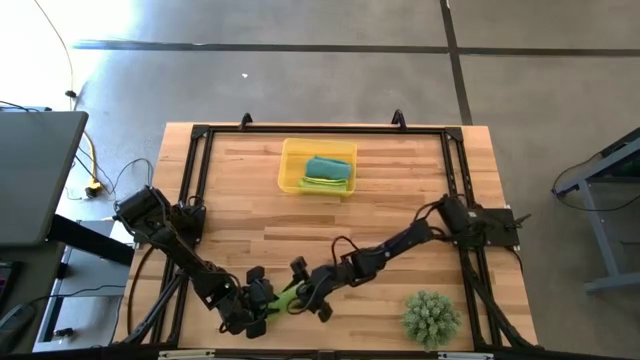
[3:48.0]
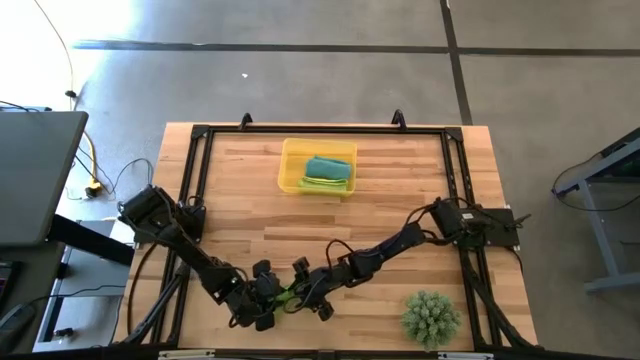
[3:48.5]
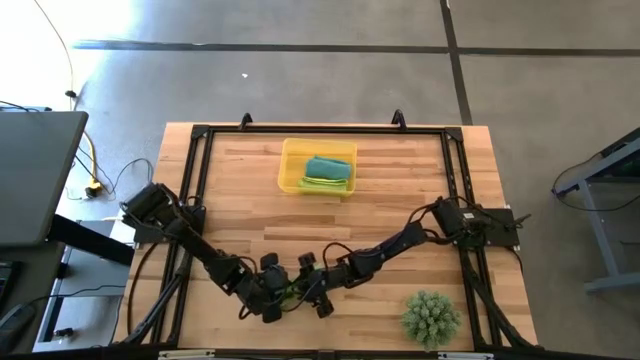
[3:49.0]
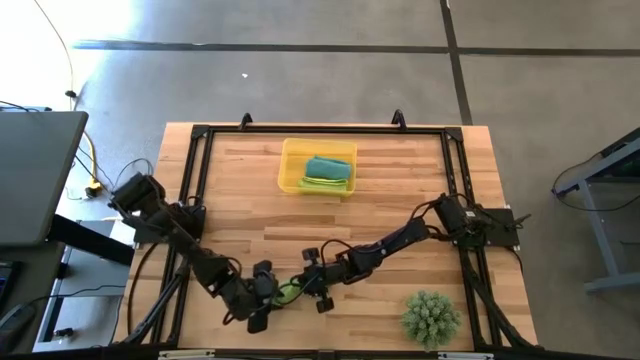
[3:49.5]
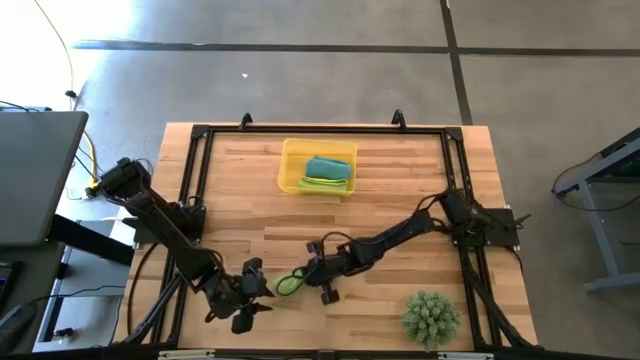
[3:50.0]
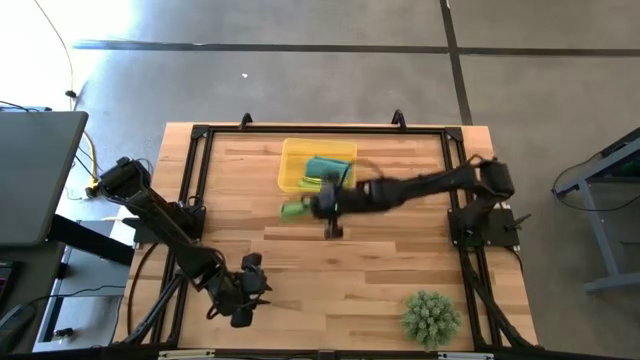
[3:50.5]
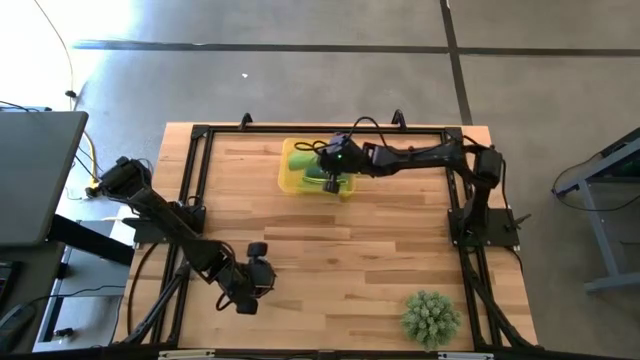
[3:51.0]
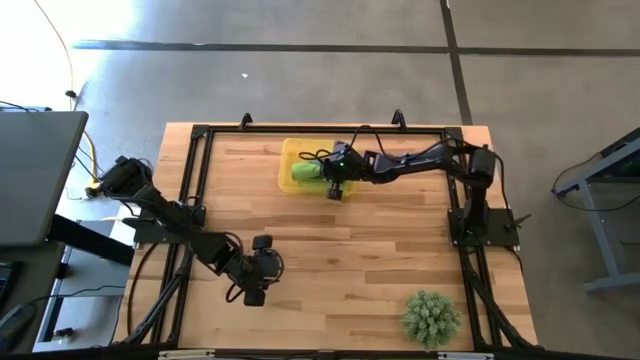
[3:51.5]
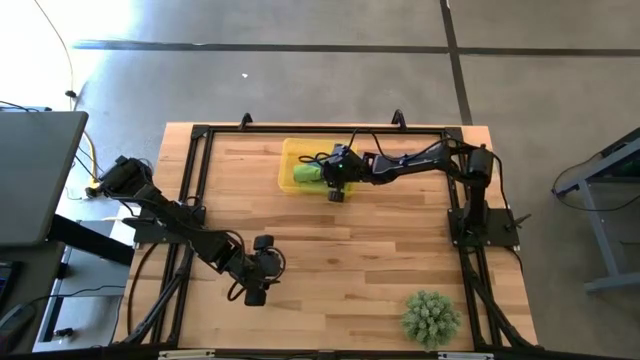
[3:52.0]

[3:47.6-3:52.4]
Task: Roll microfiber towels into tight, uniform cylinder then place into a basket
Put the rolled green microfiber towel into the bin

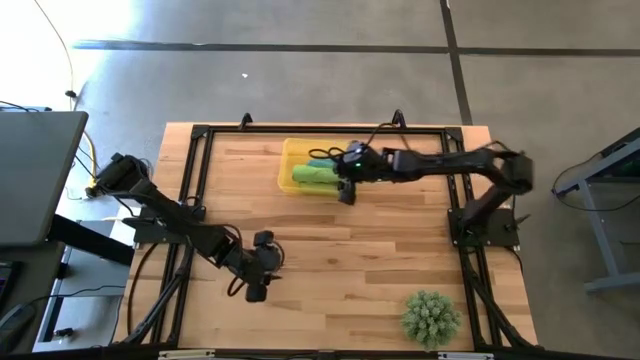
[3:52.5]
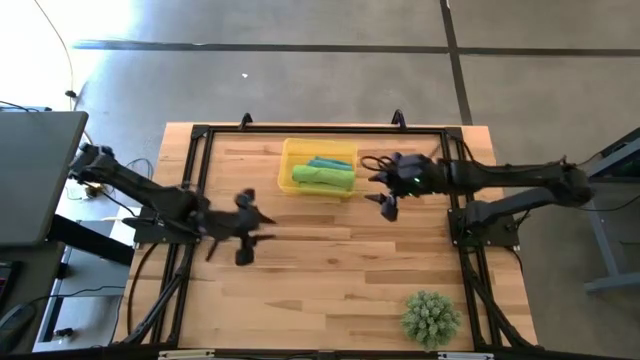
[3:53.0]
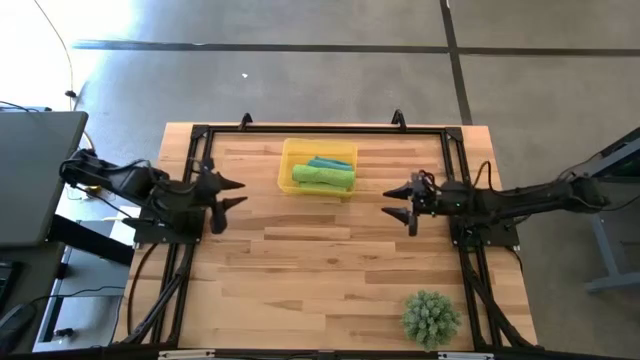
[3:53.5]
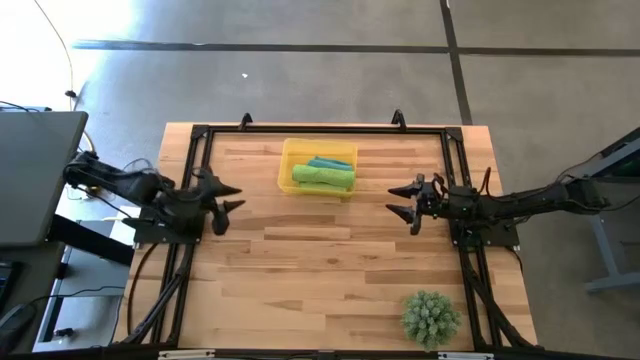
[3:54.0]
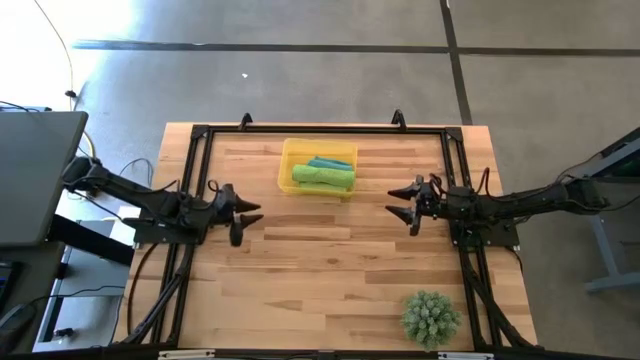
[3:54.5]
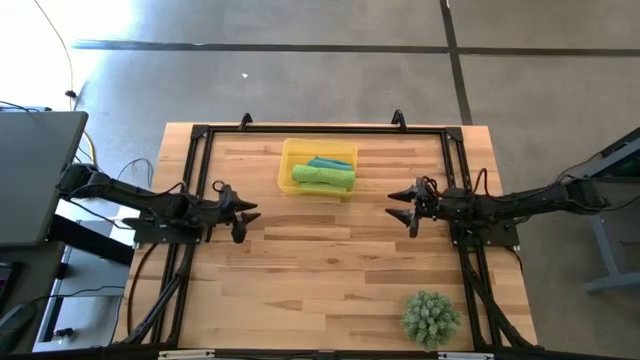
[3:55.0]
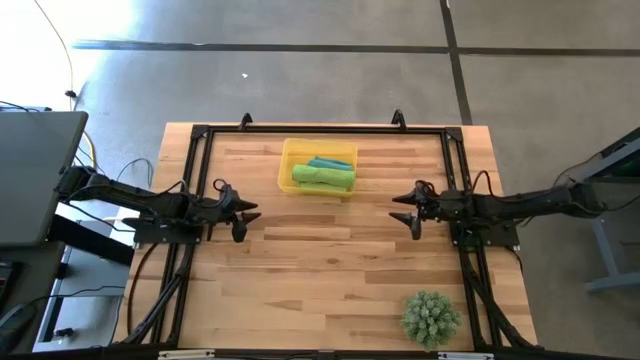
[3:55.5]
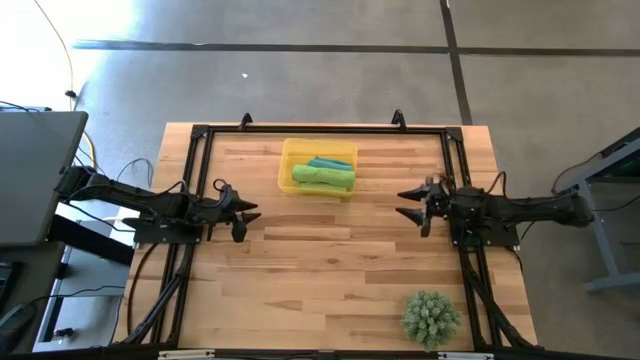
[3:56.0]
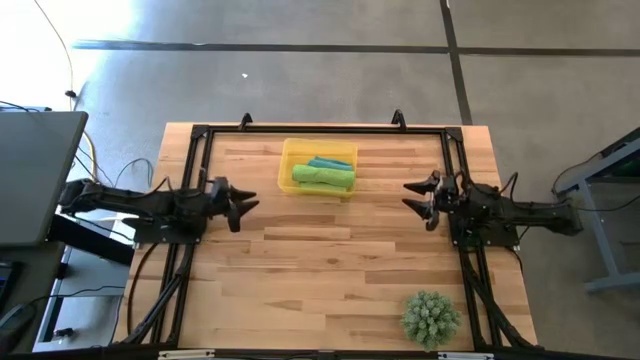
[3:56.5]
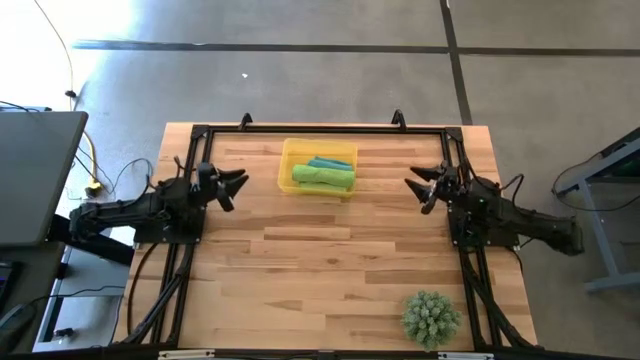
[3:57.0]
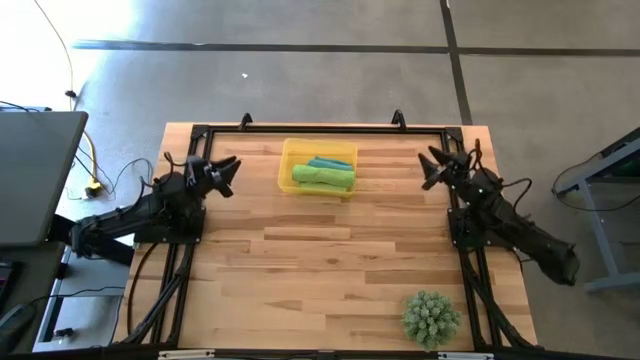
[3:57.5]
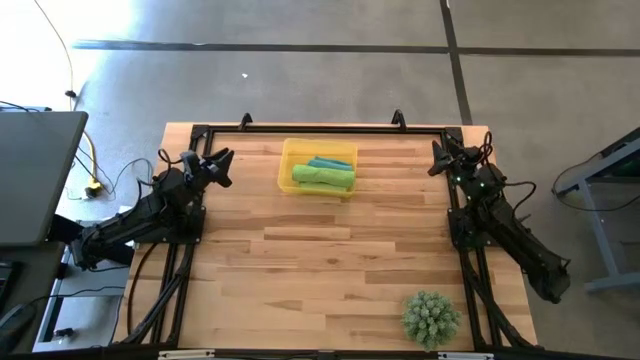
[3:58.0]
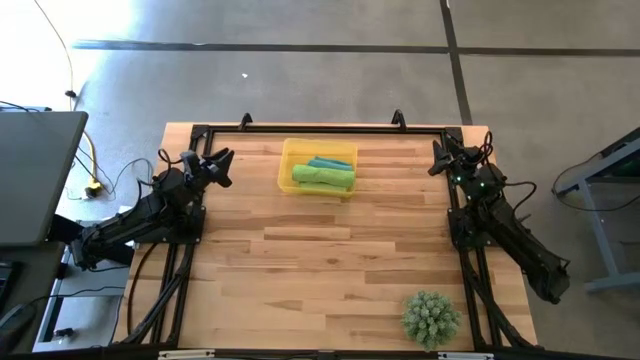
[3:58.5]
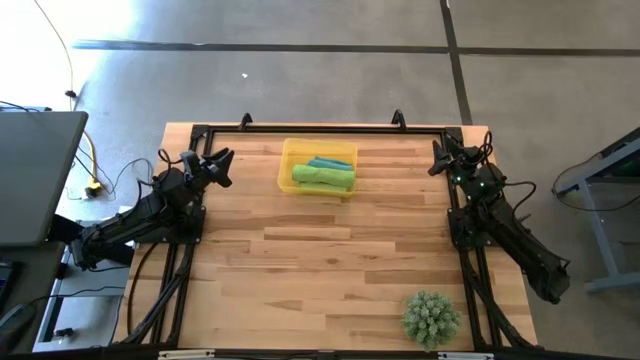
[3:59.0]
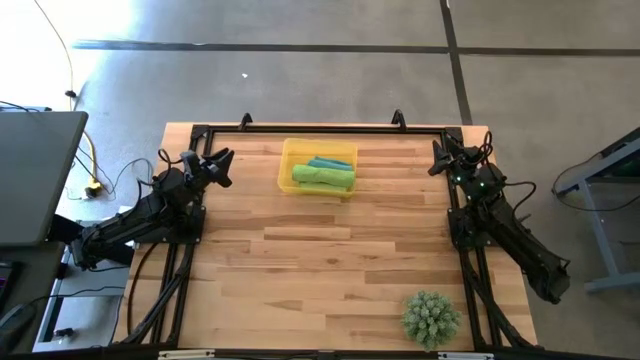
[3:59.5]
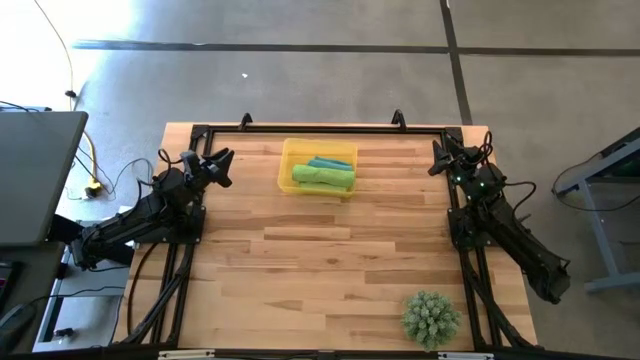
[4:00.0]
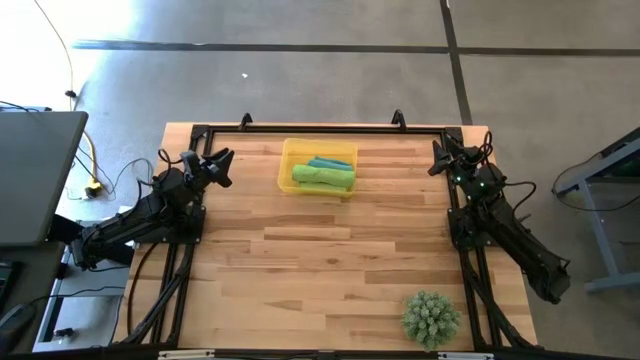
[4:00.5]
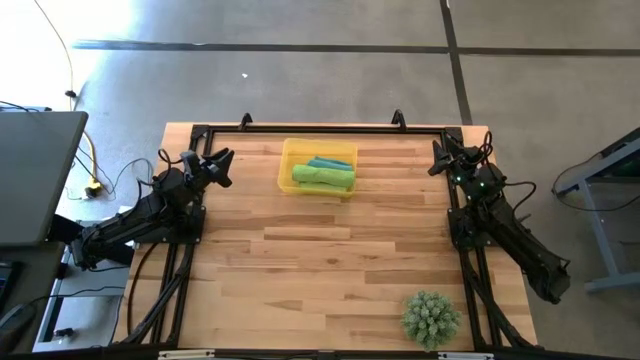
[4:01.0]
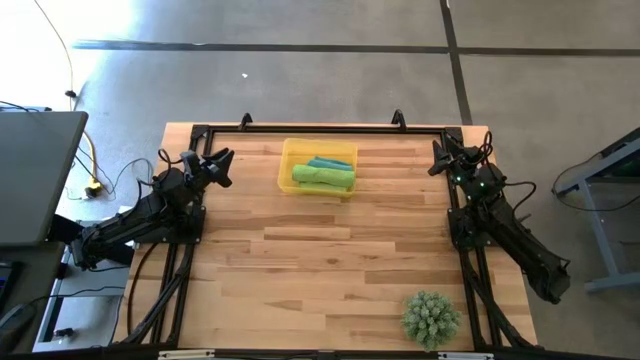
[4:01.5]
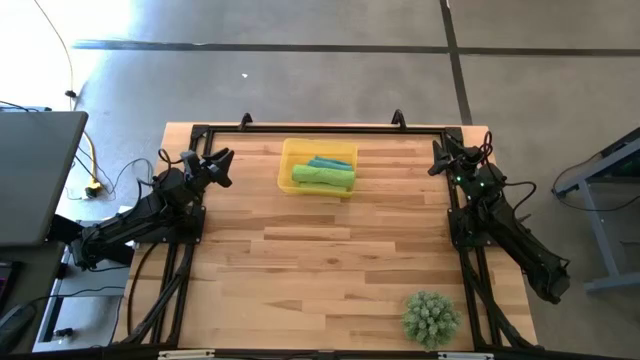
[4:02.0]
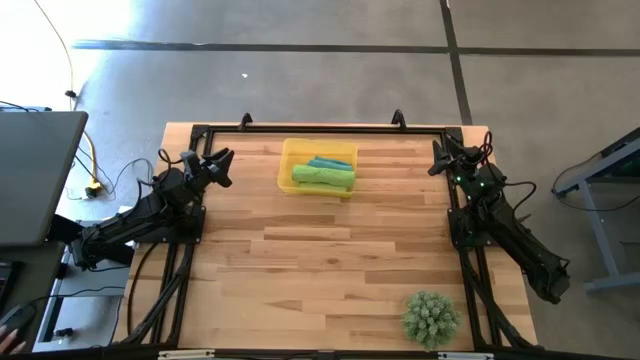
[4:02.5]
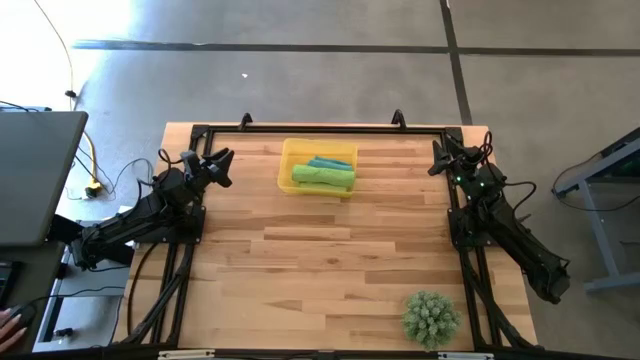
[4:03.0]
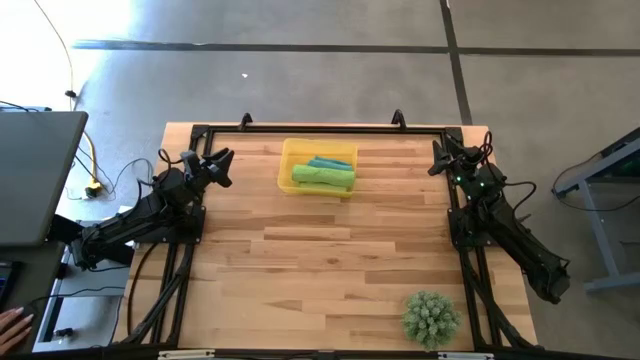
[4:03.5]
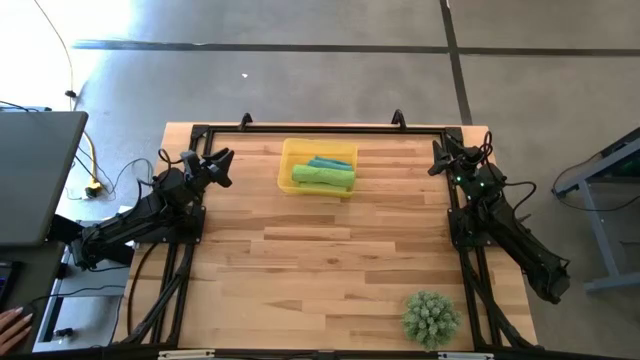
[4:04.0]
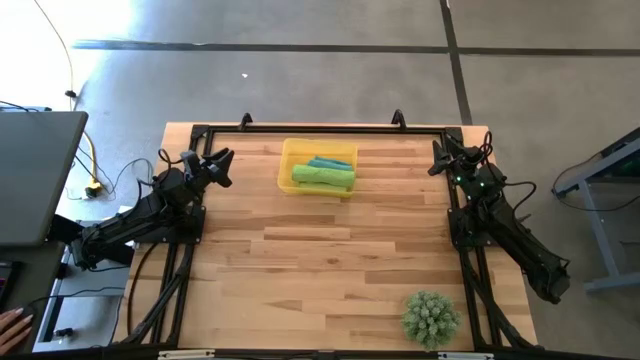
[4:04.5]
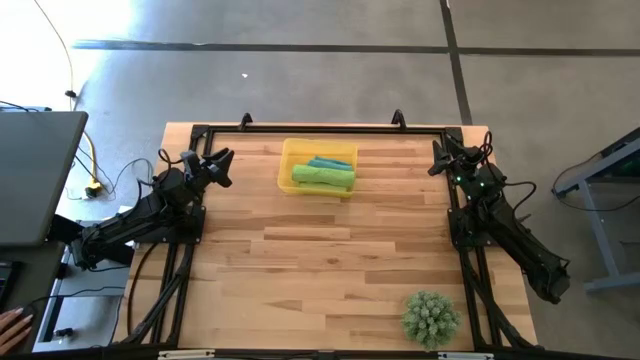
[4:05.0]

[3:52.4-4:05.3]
Return to Home Position
